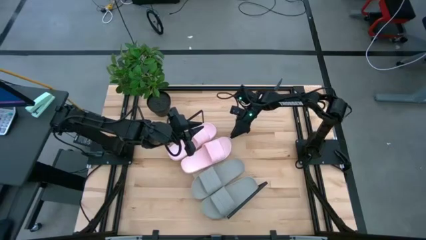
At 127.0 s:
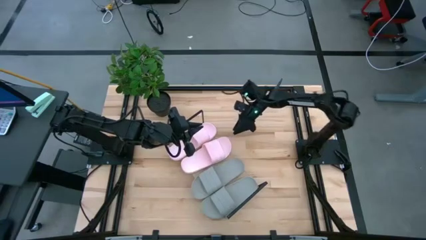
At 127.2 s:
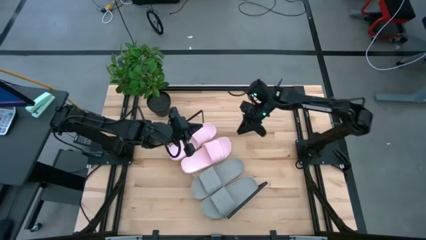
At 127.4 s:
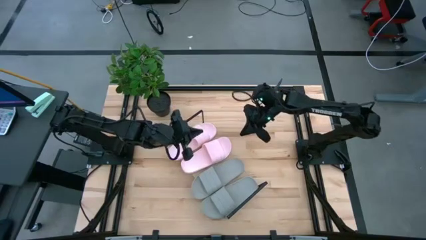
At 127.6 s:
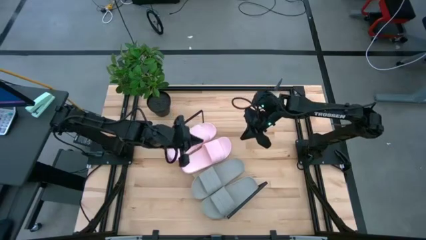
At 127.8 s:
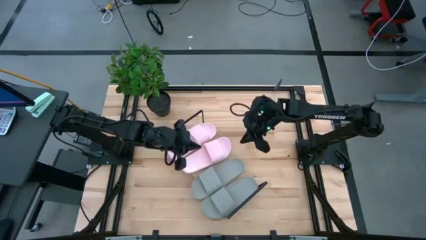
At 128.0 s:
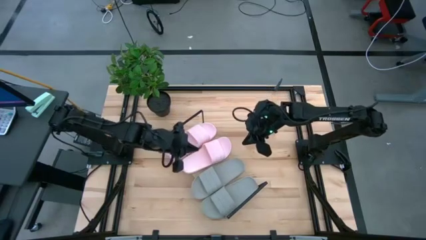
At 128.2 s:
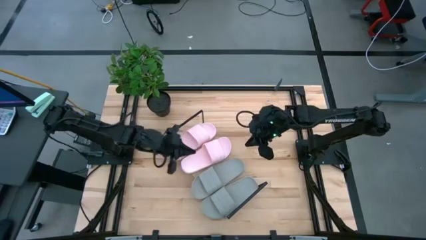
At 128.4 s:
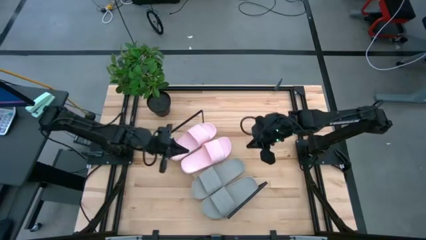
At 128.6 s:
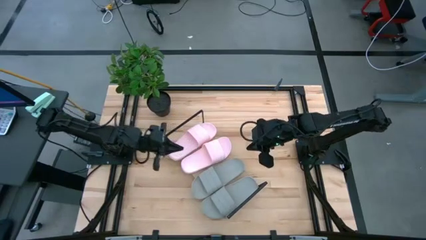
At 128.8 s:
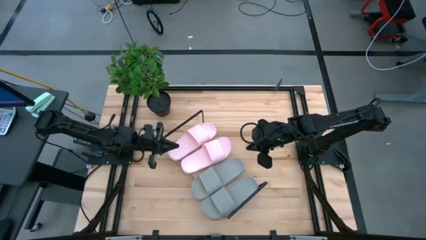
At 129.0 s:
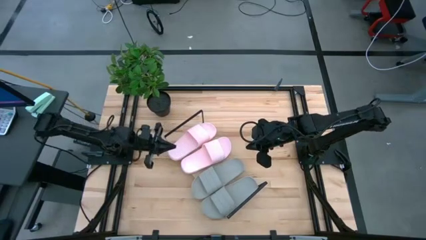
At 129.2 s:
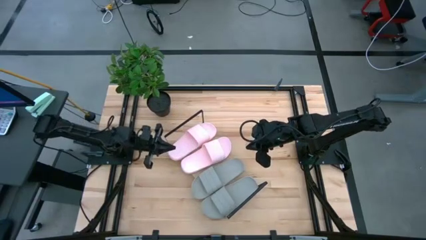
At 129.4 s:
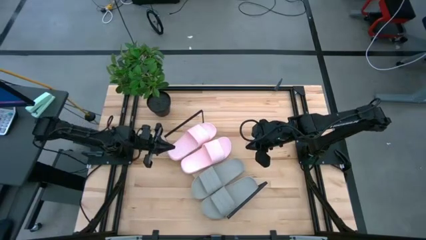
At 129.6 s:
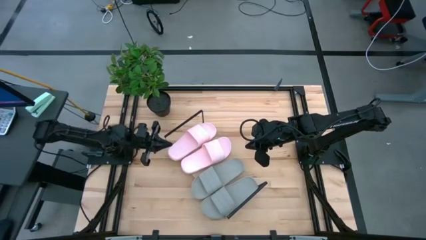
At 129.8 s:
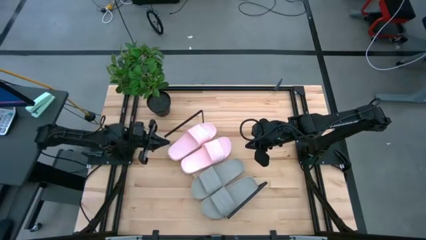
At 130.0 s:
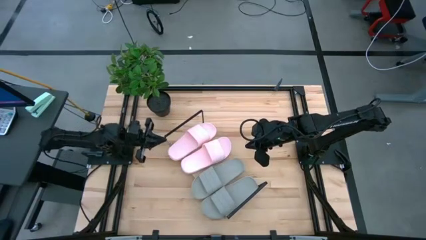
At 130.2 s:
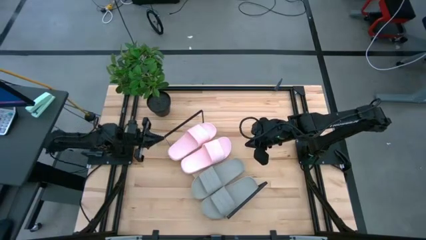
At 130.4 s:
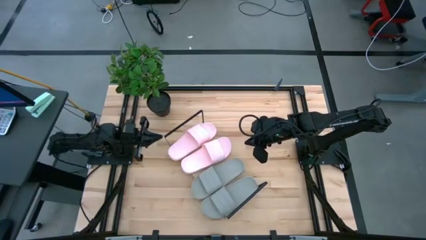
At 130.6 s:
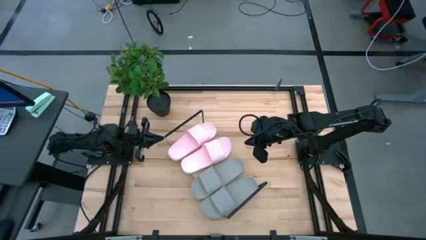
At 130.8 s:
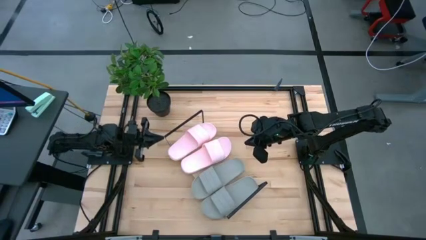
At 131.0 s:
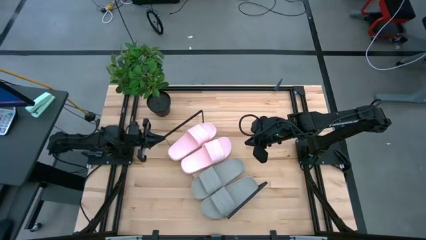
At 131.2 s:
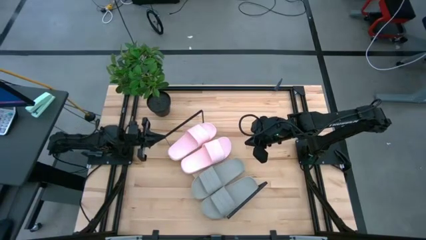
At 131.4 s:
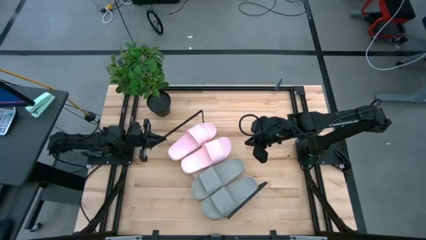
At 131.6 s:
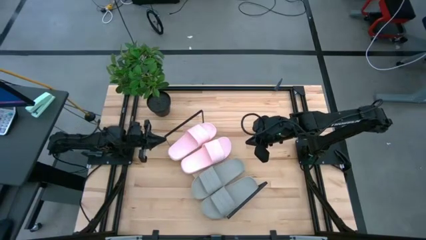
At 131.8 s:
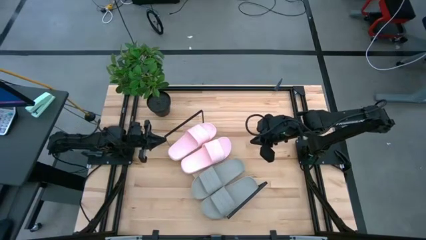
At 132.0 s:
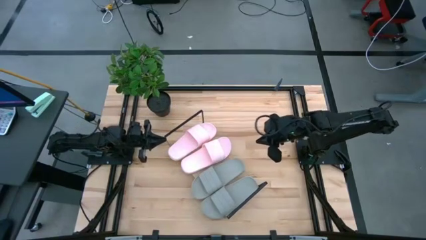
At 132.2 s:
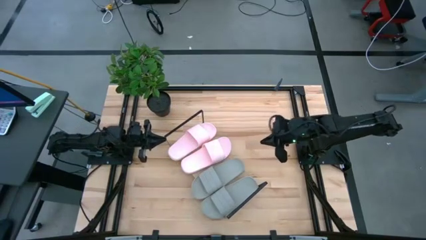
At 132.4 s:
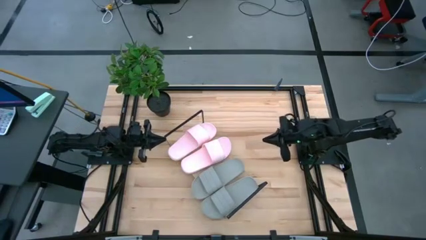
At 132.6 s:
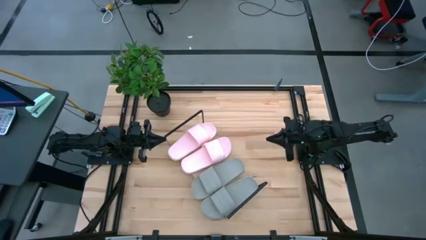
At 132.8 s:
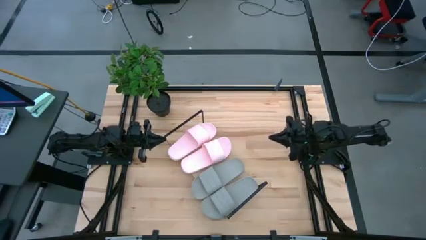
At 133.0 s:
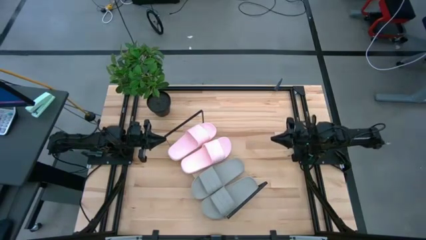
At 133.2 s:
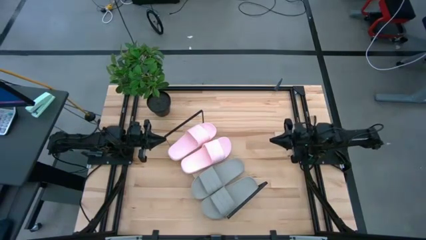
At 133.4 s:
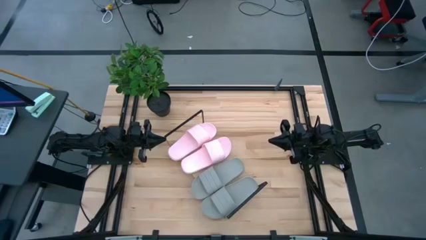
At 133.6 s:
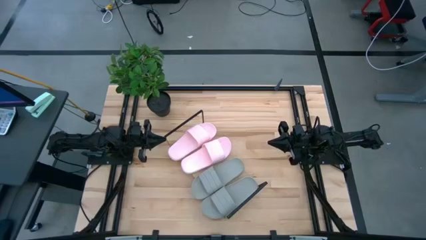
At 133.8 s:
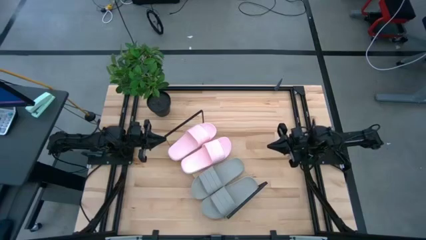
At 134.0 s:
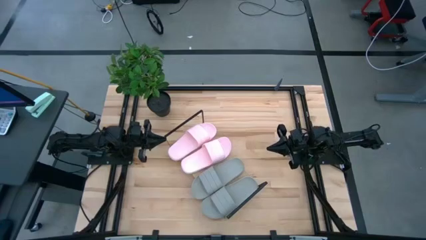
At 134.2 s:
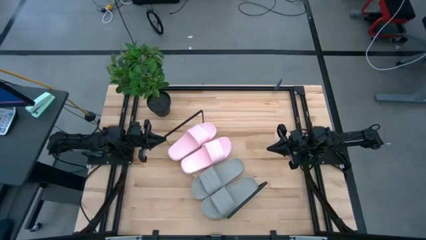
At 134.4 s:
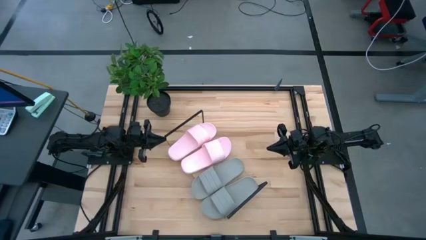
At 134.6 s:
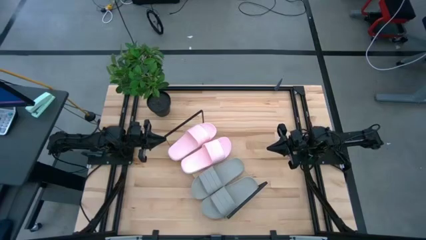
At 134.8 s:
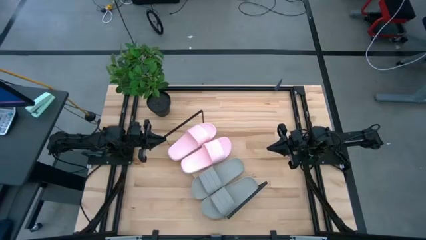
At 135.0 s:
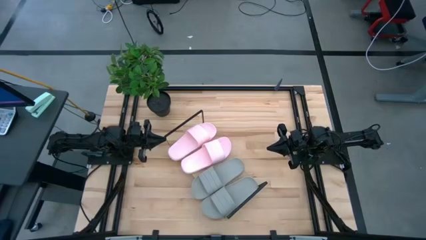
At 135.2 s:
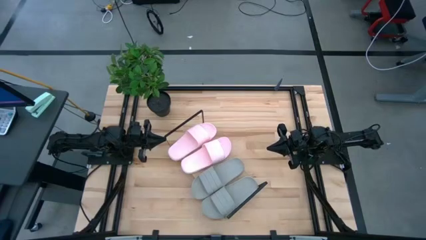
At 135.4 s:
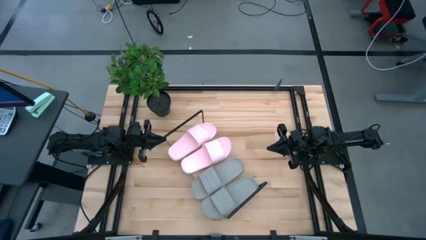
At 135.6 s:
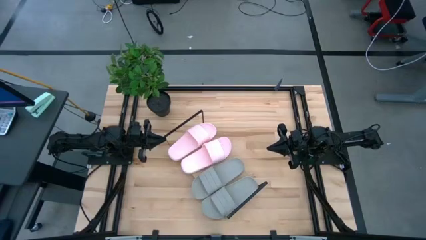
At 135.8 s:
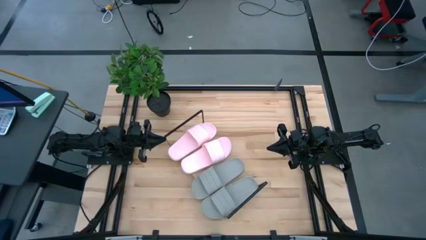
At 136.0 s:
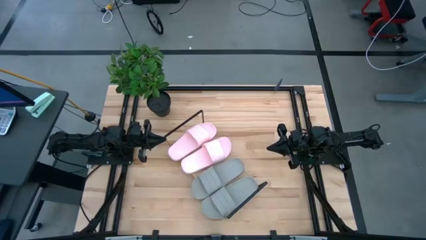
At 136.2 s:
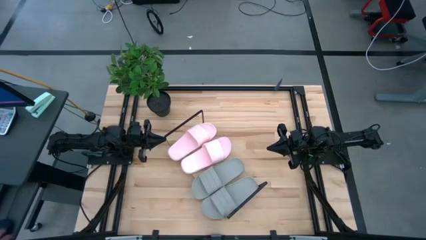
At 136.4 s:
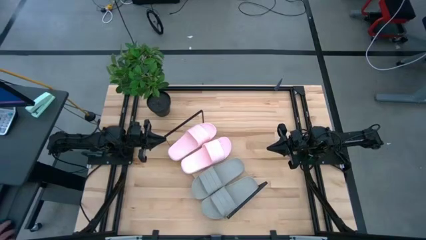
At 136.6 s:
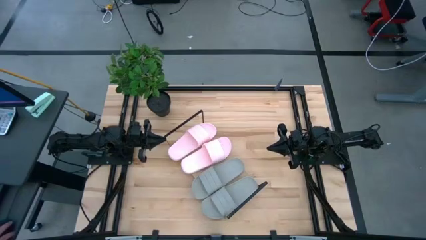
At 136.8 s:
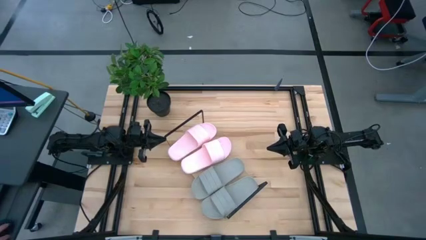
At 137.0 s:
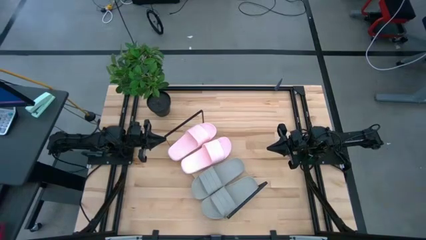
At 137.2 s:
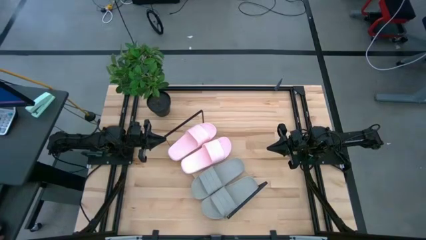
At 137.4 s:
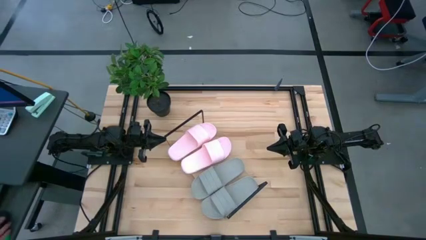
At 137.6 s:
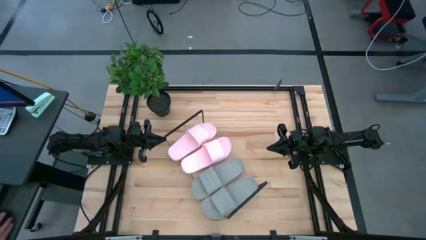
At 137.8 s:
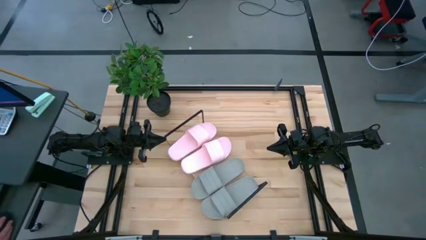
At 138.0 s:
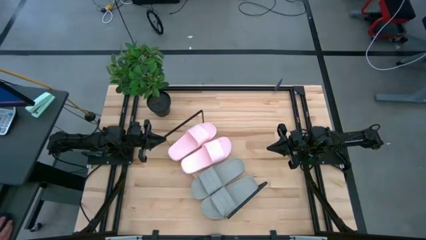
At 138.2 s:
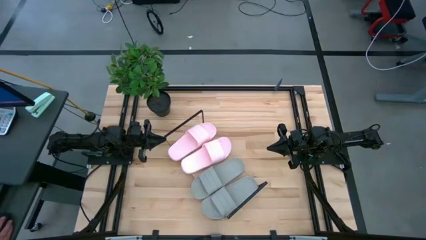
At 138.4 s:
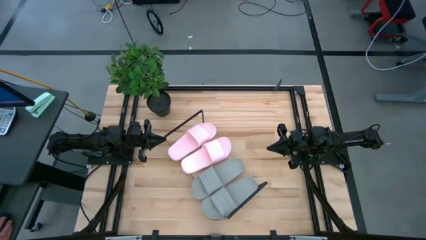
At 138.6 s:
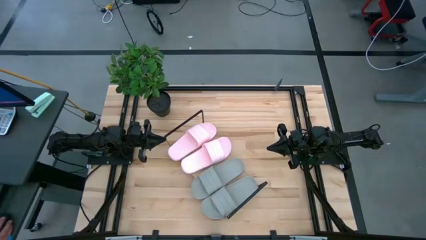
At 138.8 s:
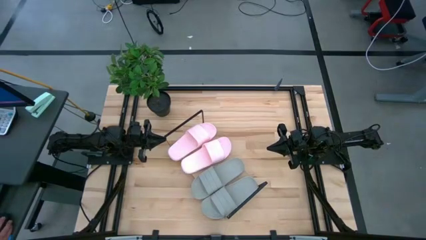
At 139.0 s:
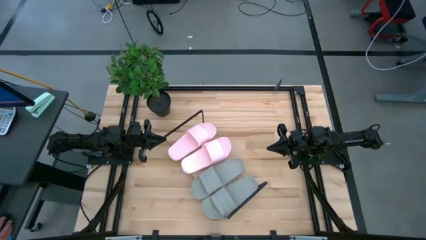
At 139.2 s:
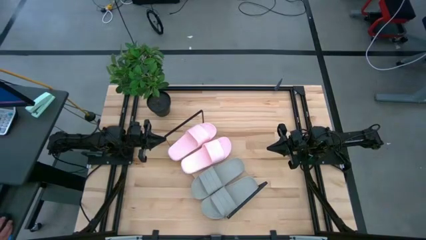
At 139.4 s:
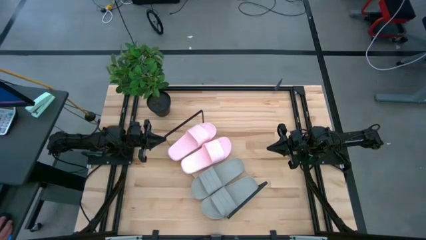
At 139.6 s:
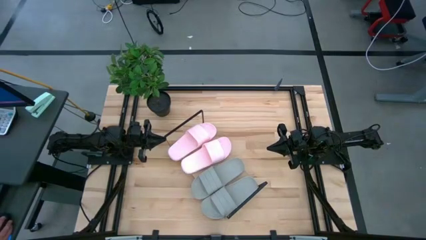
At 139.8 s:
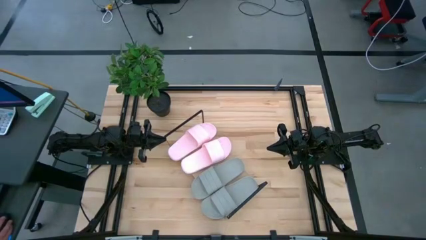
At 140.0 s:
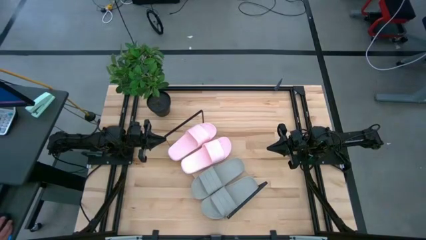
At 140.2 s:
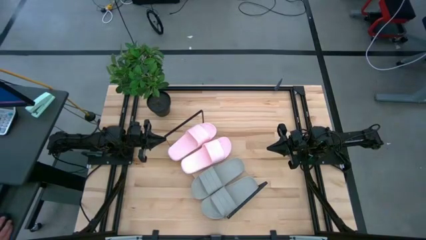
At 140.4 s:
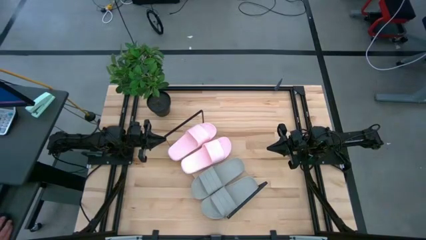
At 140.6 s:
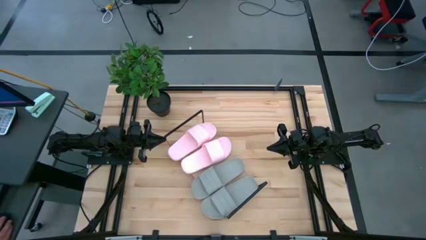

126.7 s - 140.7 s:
Task: Pick and place slides into the shelf
Return to Home Position
